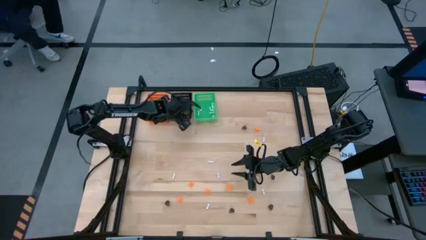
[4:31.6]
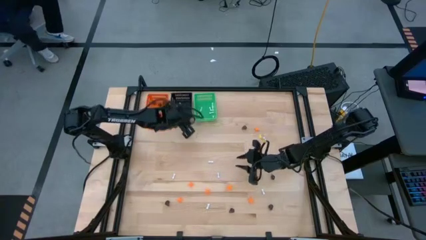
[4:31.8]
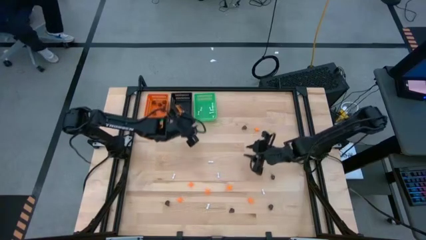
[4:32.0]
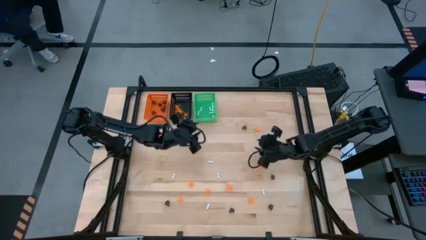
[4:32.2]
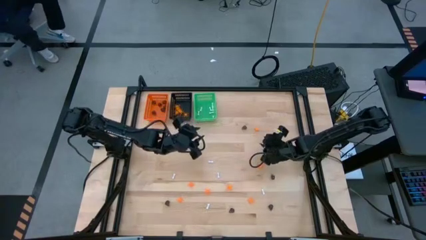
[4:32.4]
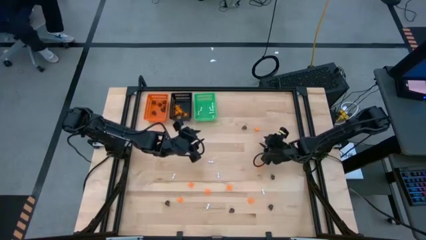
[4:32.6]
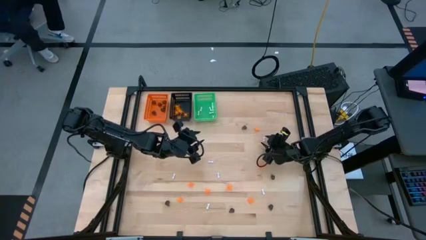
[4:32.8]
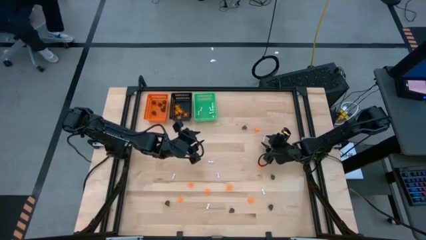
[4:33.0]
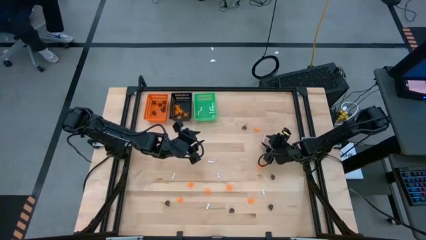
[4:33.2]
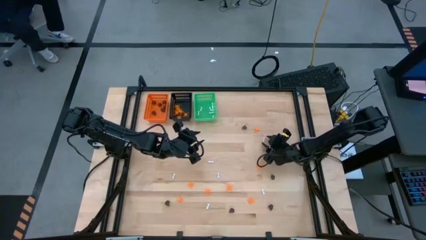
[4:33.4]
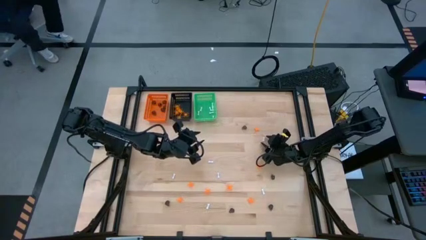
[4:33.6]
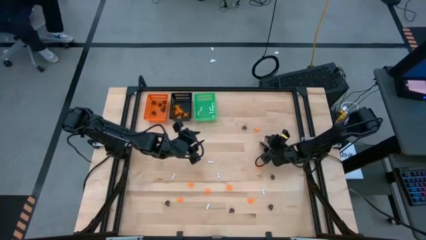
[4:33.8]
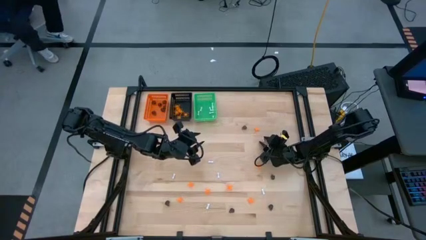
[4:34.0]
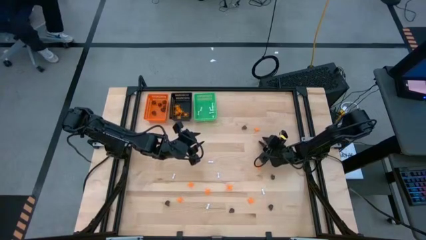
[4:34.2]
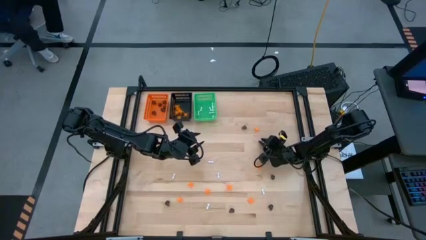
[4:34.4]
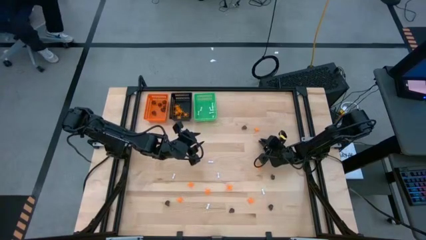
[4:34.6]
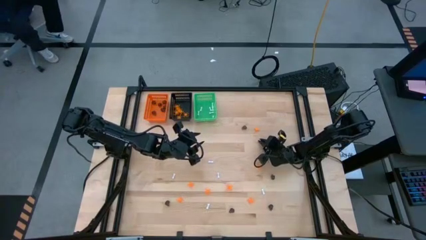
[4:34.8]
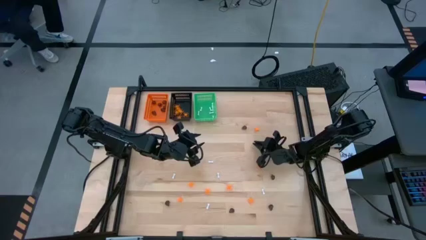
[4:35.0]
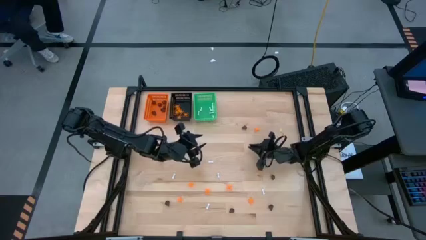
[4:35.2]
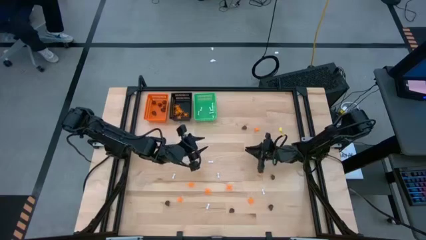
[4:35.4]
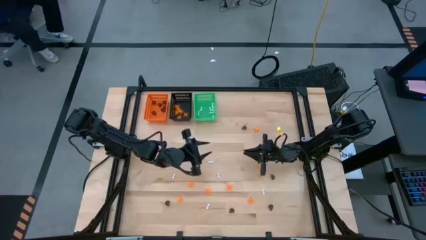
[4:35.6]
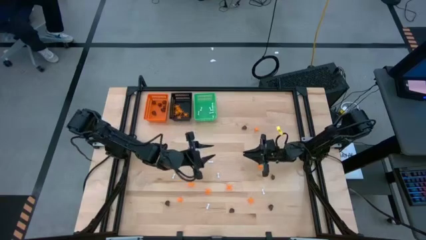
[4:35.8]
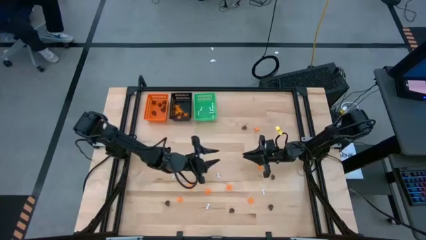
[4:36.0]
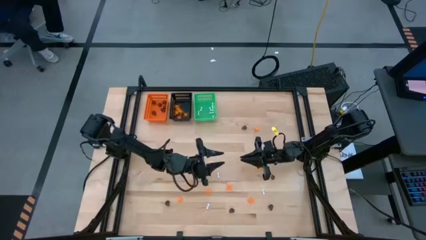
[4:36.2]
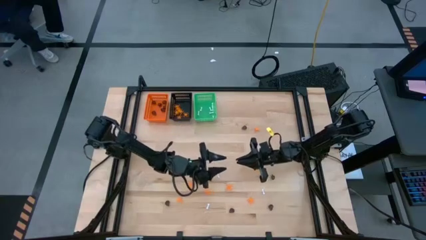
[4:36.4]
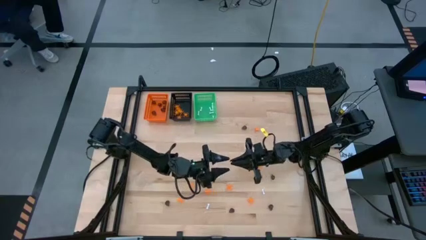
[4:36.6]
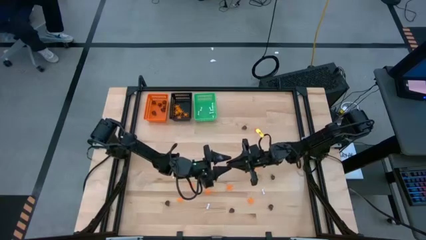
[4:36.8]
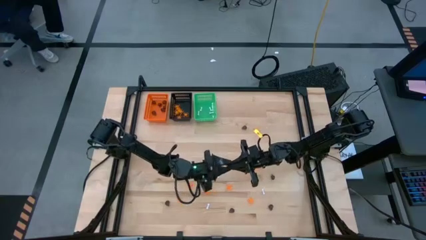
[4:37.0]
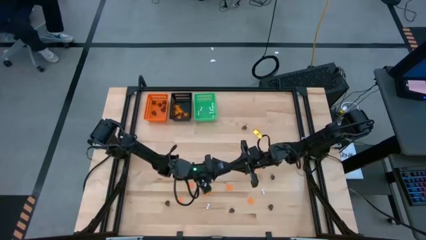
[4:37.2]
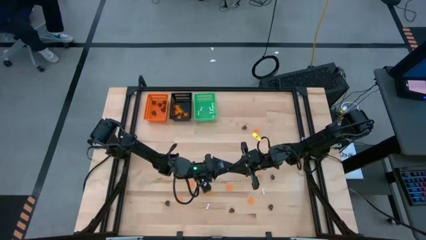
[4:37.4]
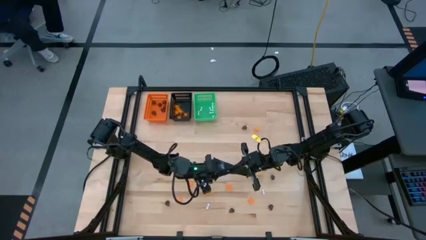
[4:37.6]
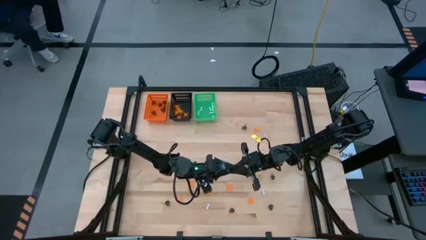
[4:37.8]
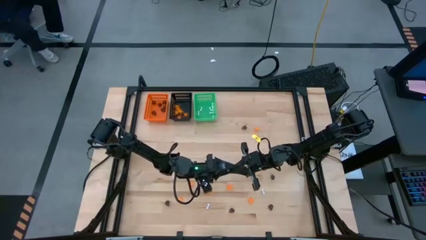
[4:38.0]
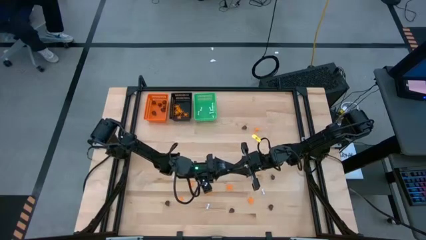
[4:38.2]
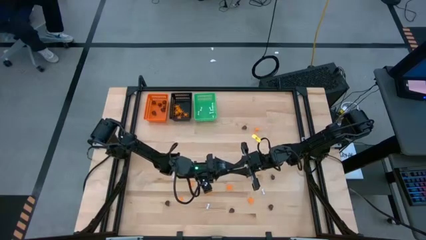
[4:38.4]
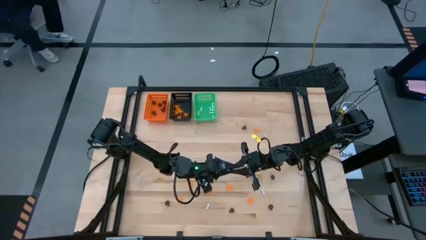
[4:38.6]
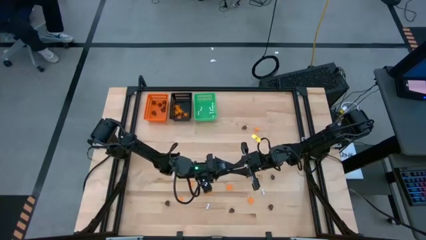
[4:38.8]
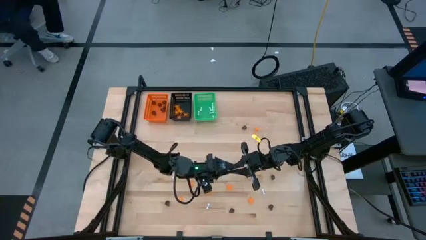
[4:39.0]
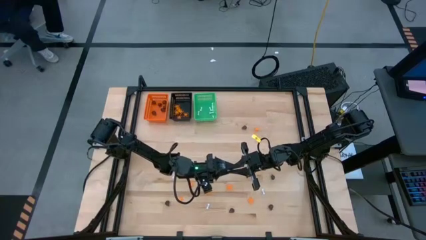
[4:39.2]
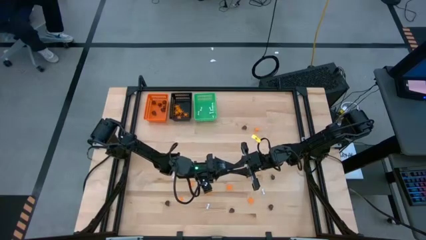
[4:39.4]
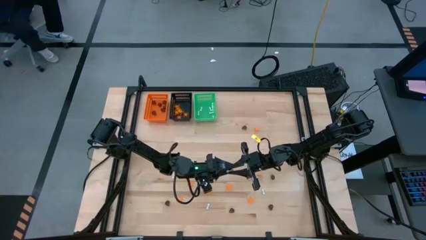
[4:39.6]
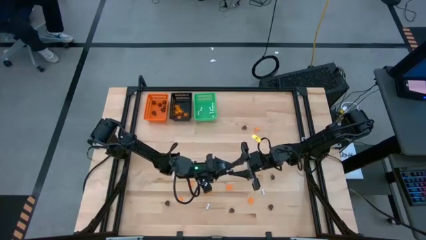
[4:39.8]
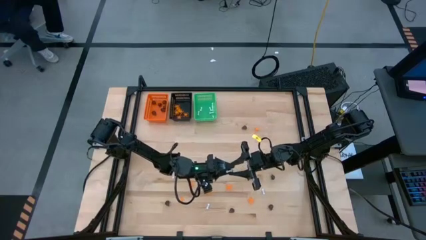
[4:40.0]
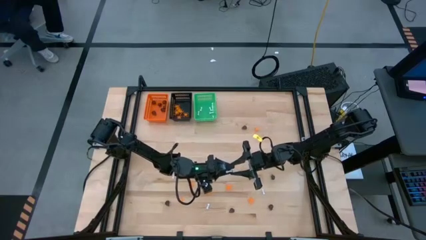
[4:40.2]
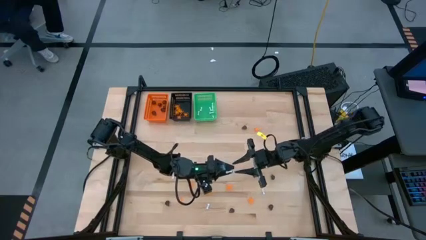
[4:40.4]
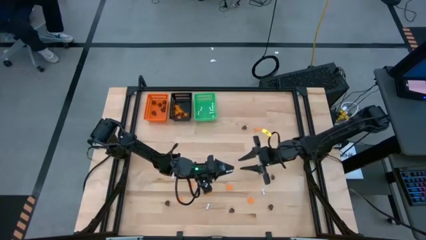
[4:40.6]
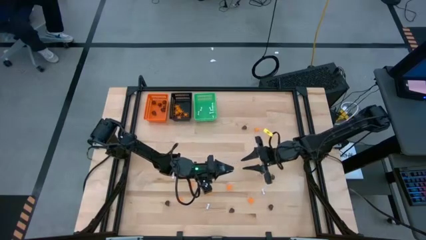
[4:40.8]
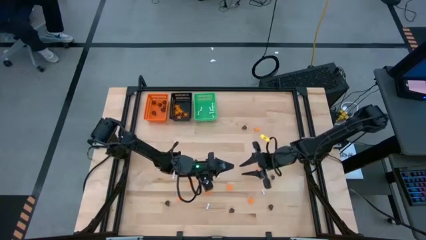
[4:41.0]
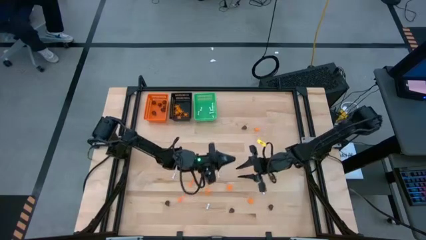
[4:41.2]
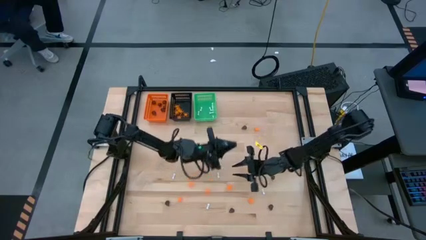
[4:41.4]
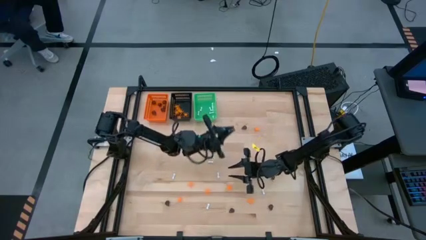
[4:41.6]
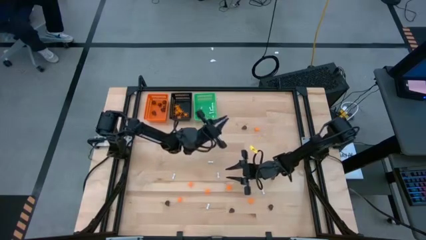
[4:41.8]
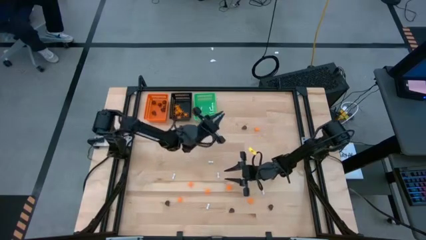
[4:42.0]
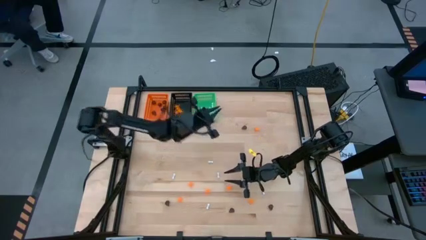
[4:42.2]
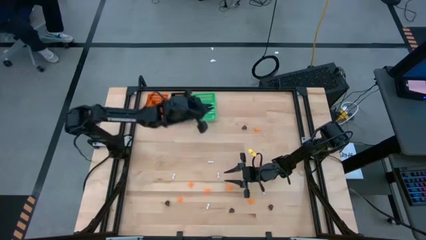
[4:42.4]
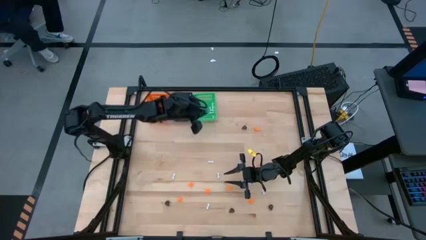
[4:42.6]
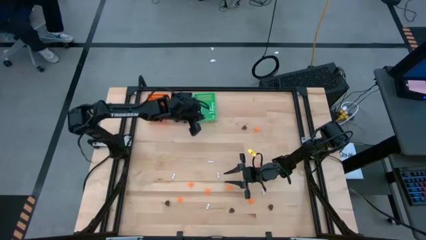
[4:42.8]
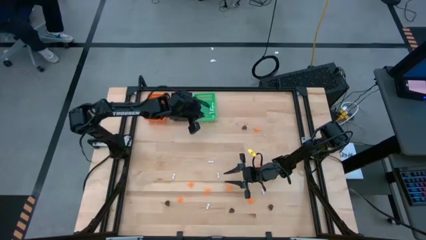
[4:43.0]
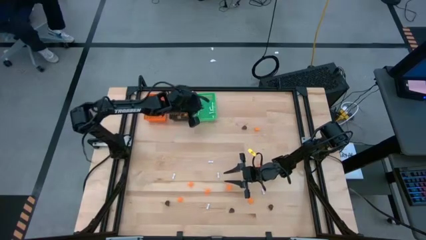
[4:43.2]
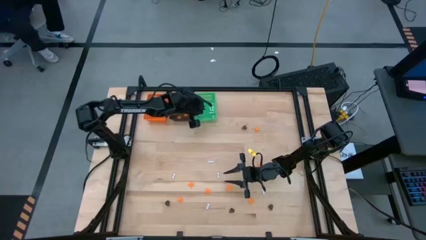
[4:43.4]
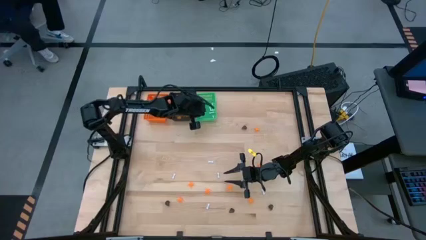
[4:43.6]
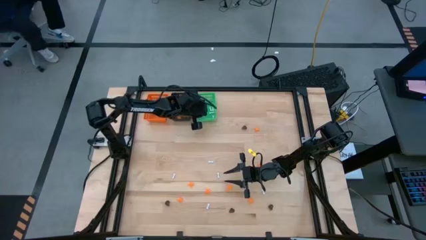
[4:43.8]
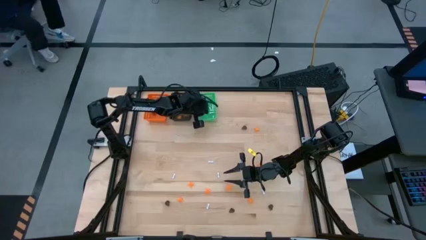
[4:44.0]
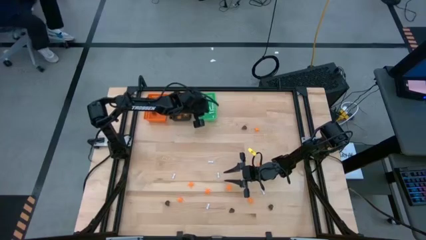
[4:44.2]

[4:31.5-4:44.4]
Task: Sort Halloween decoration
Put the white bone toy into the green bin
